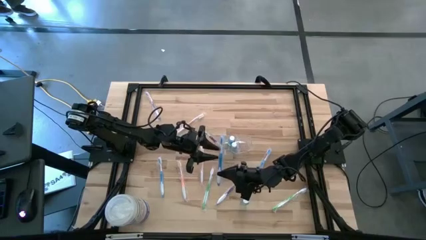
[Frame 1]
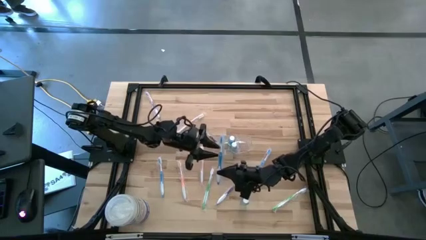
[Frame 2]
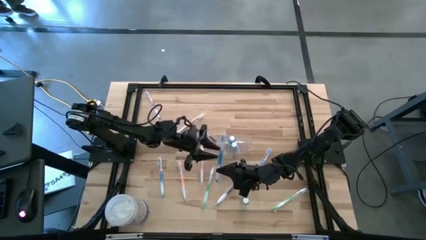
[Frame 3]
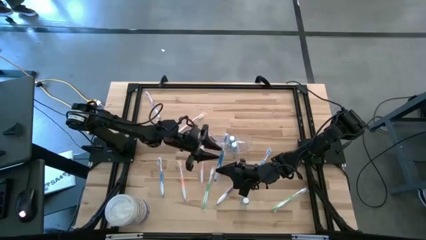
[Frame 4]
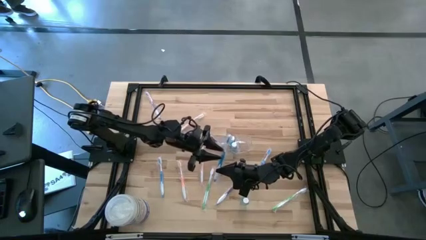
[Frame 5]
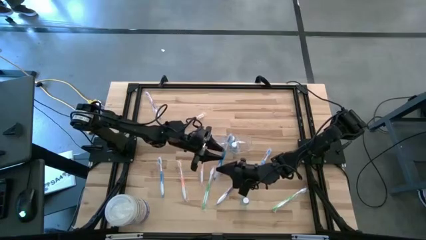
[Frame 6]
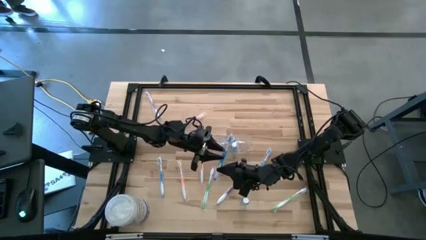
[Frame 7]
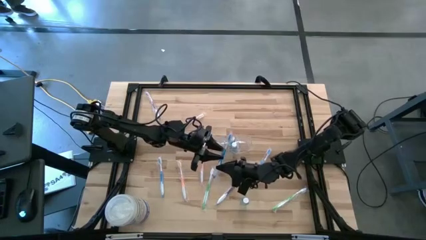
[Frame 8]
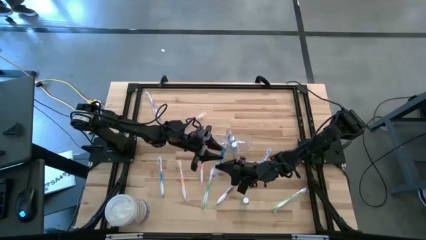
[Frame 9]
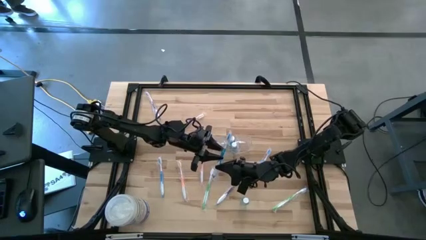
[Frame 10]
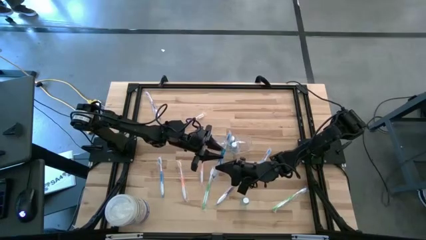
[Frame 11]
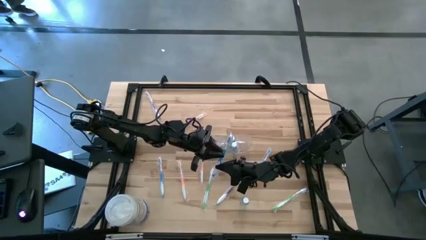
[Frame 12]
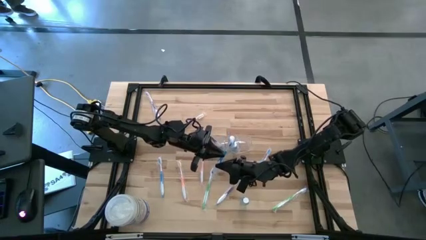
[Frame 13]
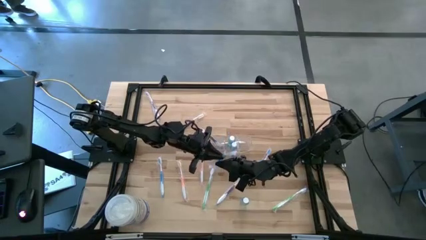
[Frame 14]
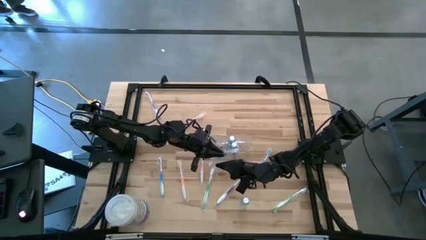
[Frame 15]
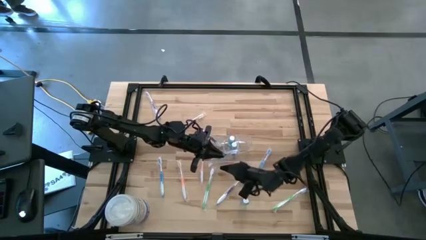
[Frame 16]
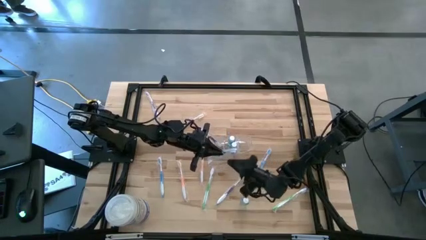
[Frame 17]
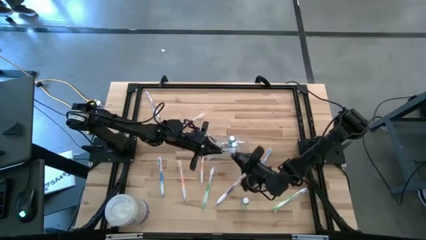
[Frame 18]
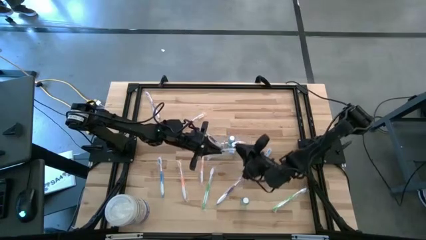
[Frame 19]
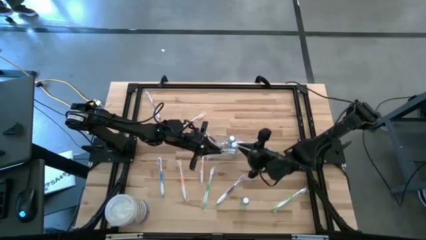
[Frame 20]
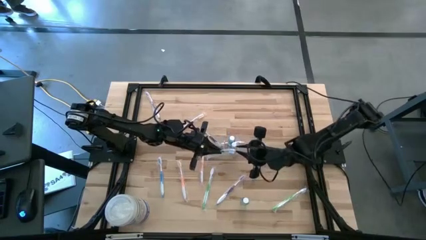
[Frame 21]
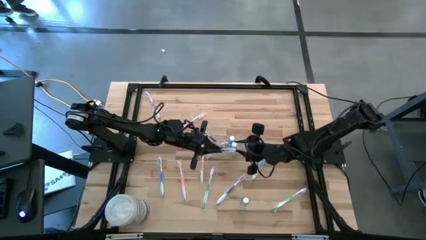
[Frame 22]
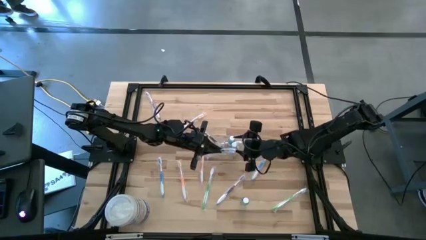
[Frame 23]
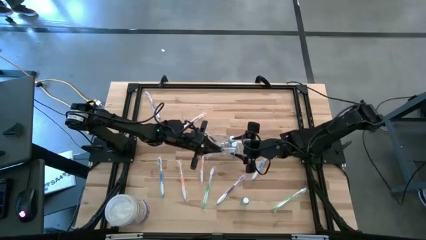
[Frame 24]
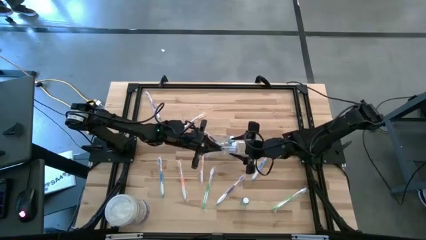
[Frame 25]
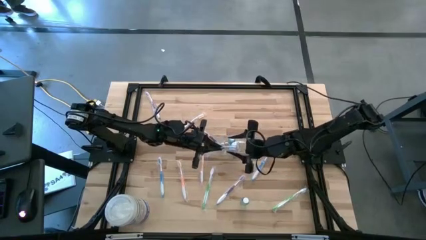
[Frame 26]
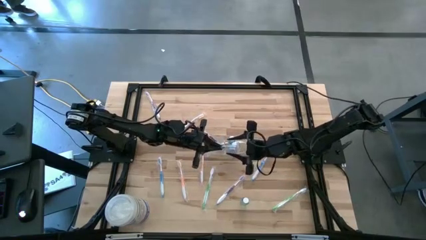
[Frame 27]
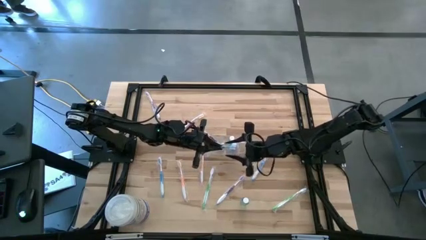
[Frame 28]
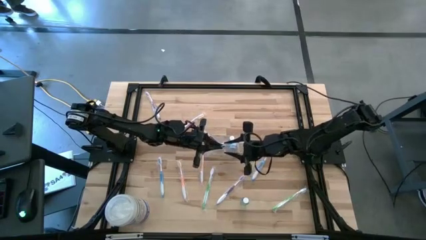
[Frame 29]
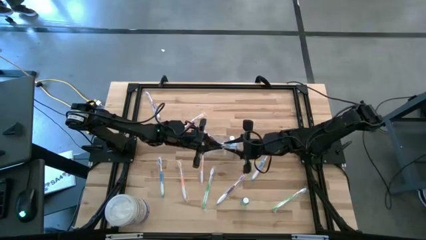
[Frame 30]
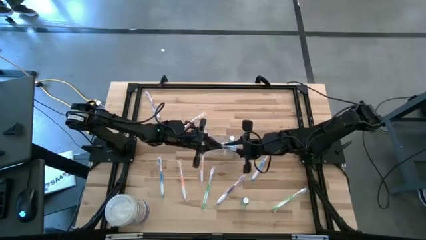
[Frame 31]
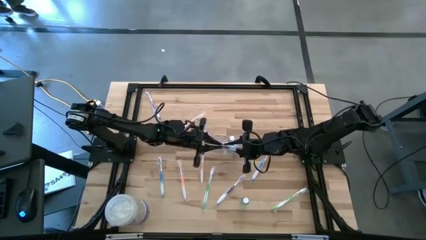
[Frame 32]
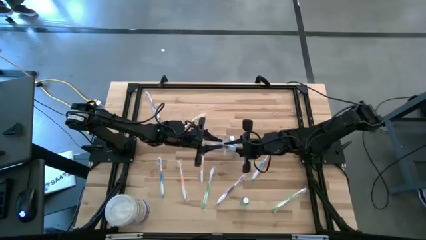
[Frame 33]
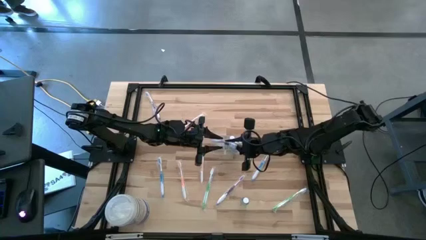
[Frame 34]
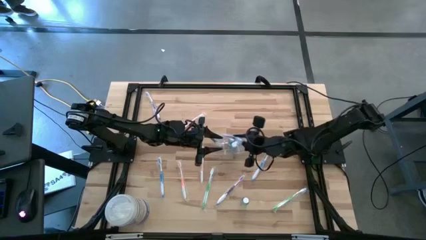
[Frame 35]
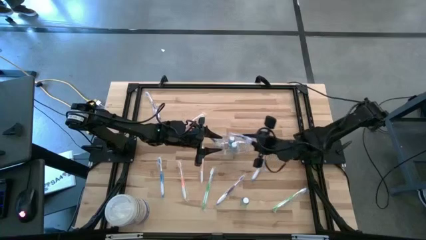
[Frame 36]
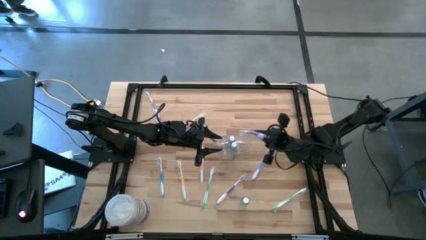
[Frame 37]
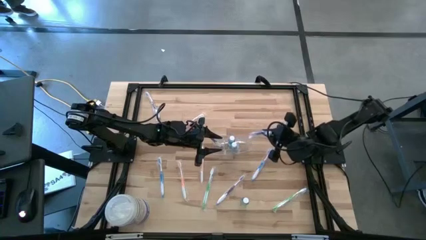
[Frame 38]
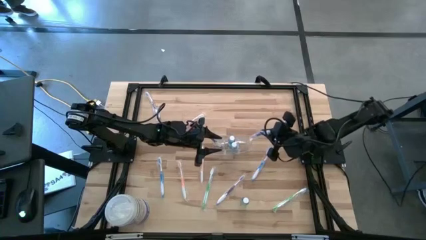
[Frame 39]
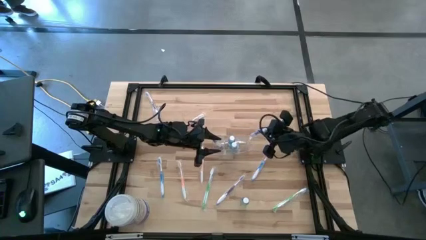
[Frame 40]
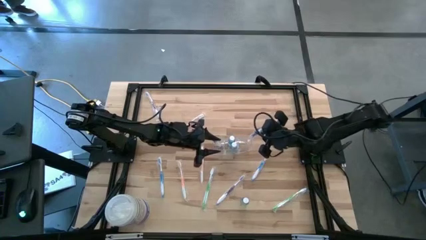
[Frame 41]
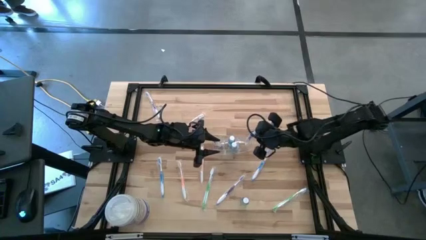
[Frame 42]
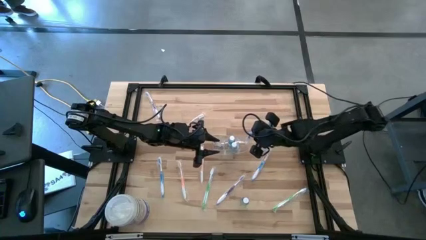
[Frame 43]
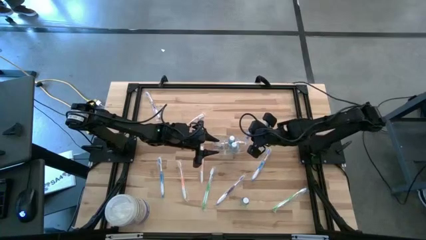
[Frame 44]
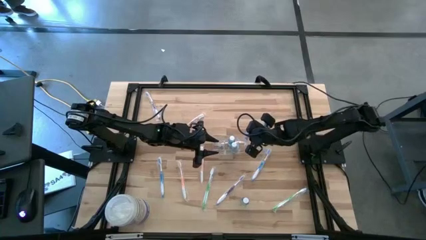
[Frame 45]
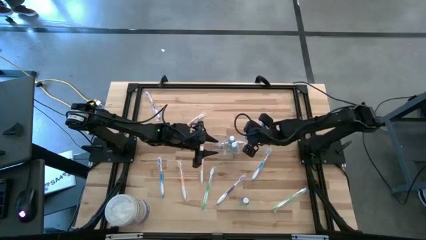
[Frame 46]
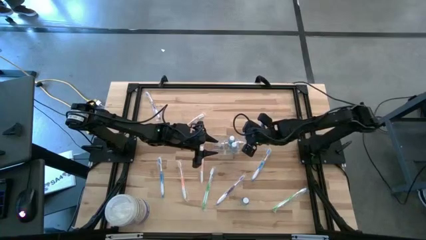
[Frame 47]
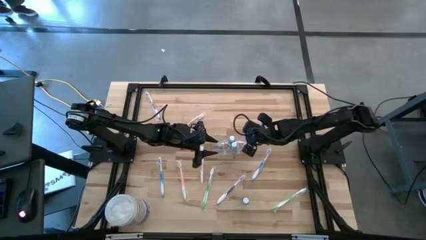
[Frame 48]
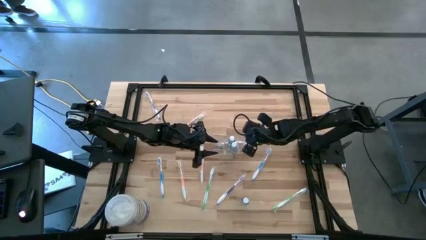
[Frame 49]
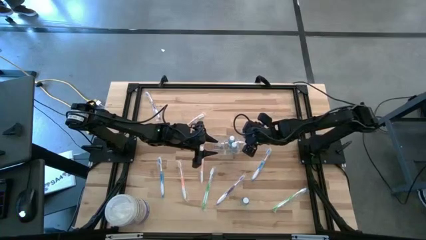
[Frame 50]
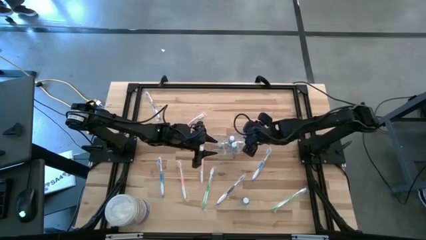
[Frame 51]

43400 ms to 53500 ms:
Task: Pick & Place toothbrushing station
Put the right blue toothbrush into the wire organizer
